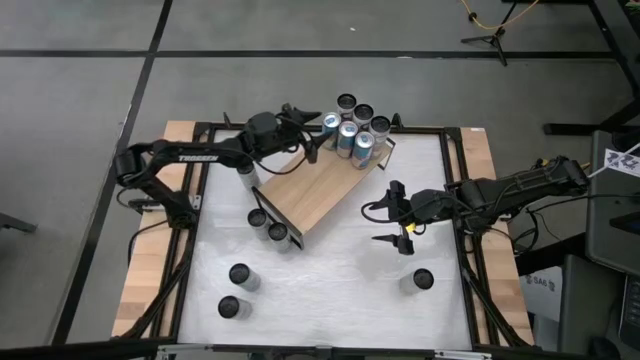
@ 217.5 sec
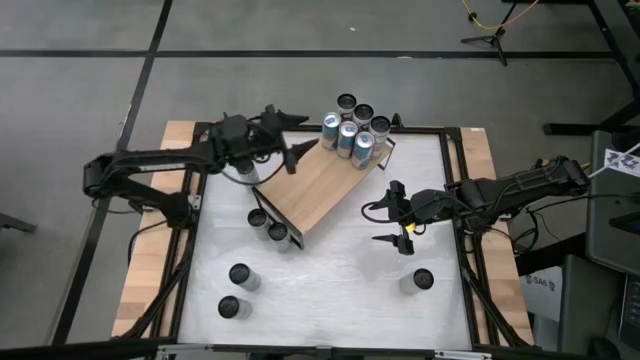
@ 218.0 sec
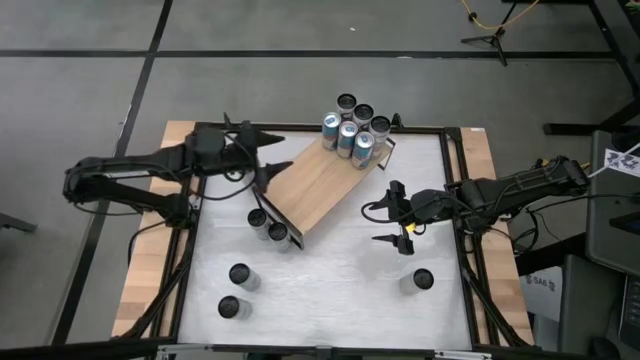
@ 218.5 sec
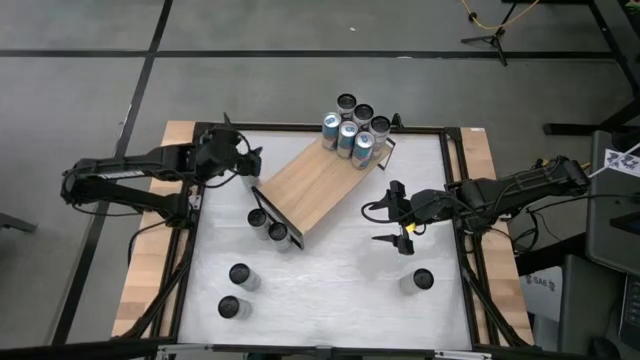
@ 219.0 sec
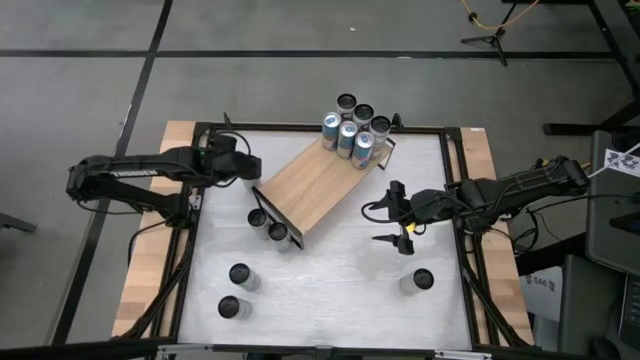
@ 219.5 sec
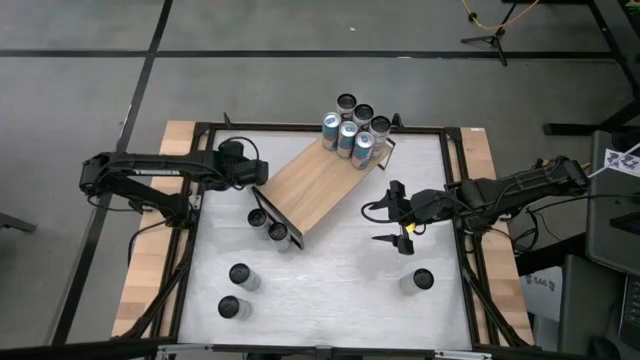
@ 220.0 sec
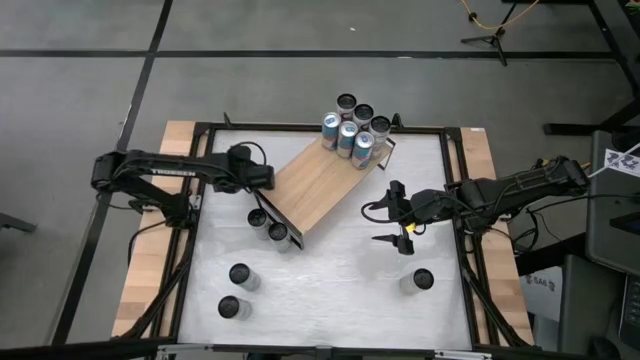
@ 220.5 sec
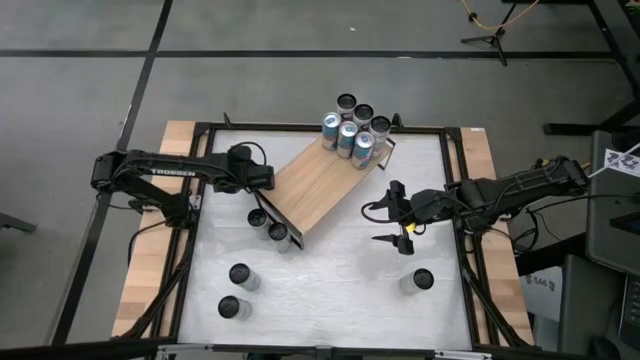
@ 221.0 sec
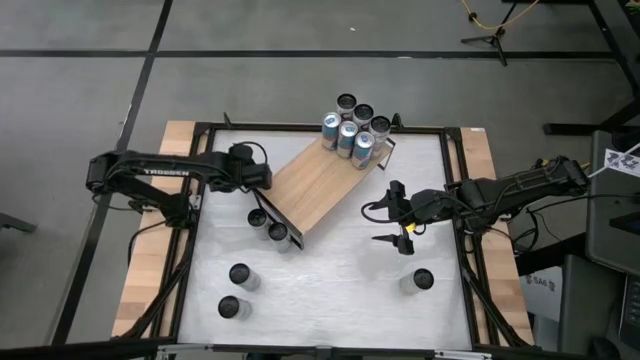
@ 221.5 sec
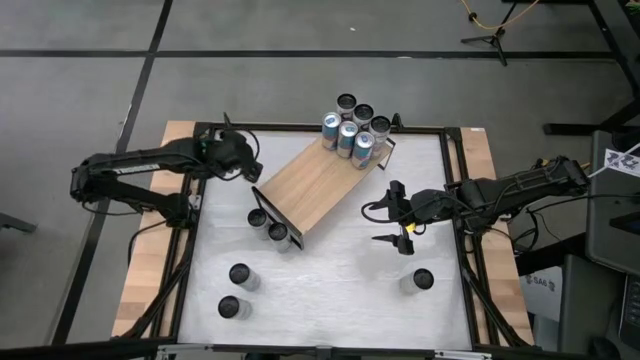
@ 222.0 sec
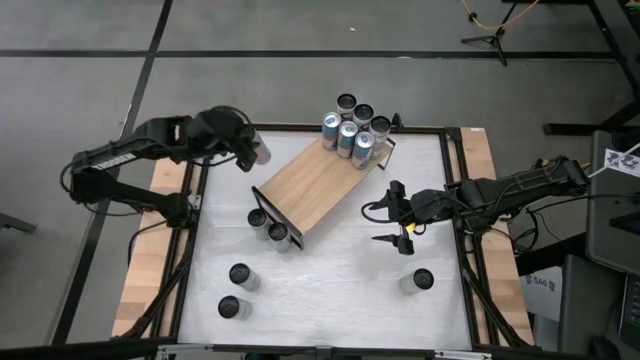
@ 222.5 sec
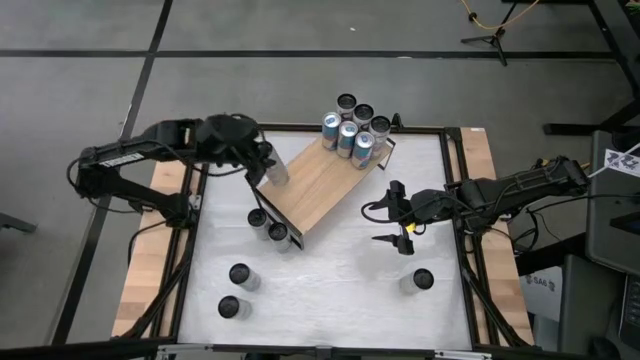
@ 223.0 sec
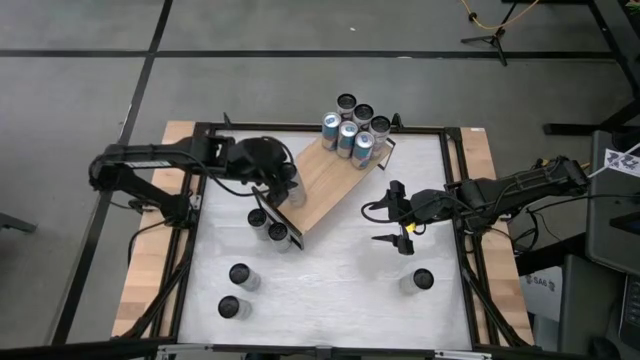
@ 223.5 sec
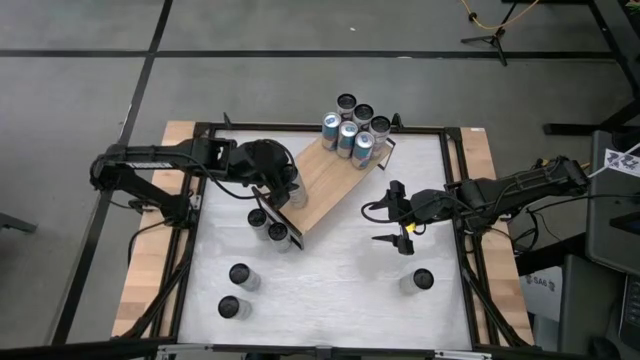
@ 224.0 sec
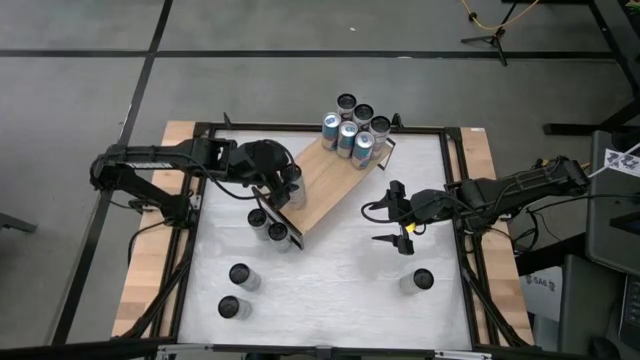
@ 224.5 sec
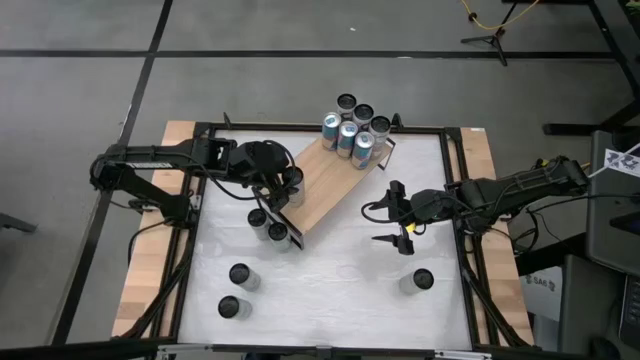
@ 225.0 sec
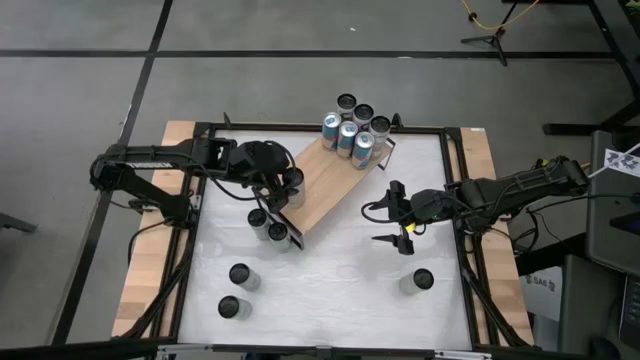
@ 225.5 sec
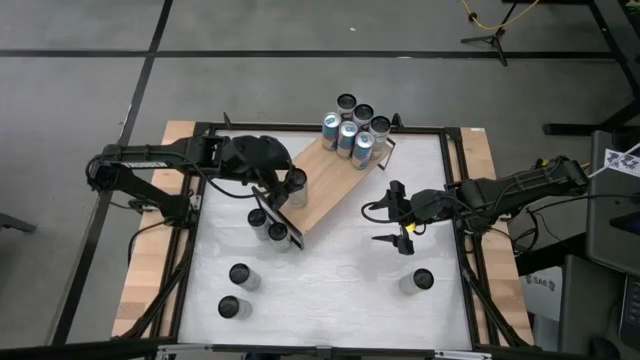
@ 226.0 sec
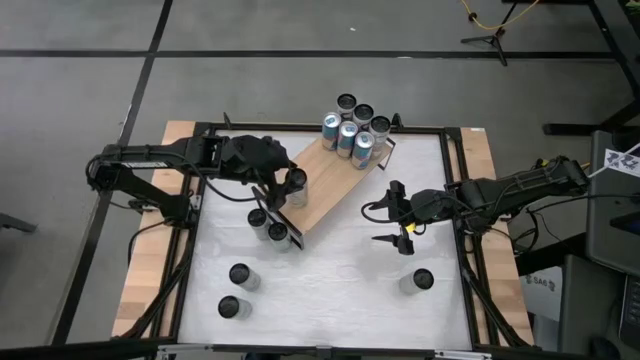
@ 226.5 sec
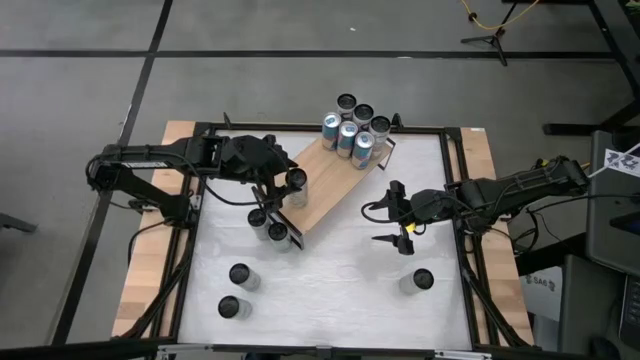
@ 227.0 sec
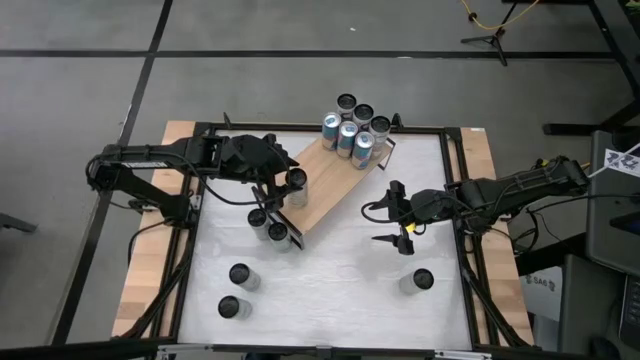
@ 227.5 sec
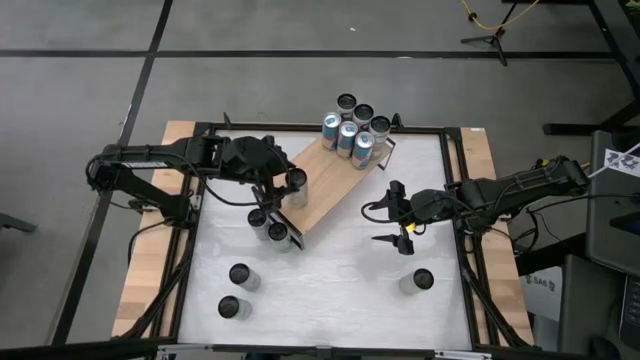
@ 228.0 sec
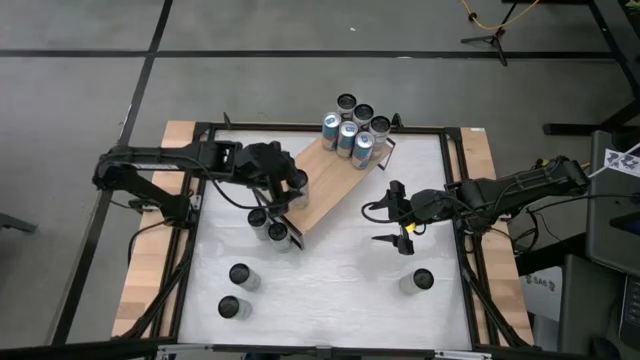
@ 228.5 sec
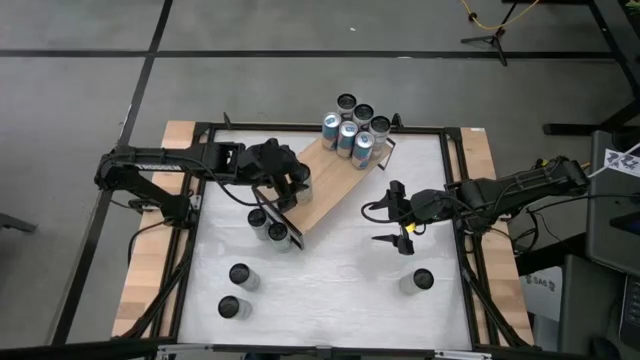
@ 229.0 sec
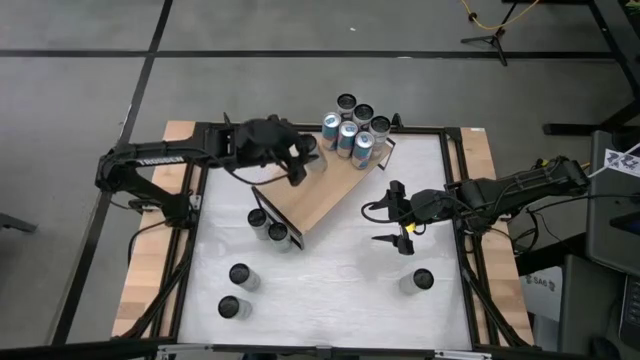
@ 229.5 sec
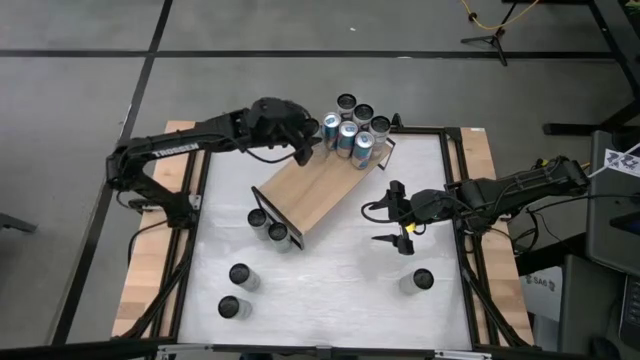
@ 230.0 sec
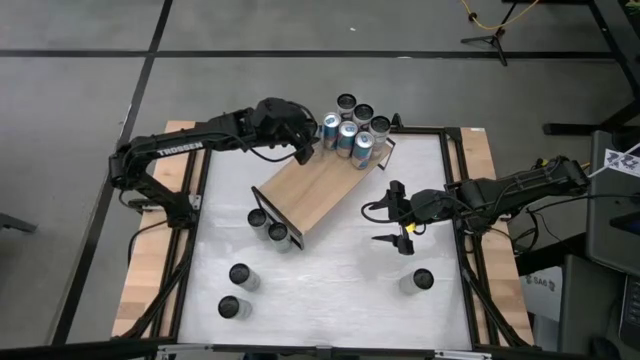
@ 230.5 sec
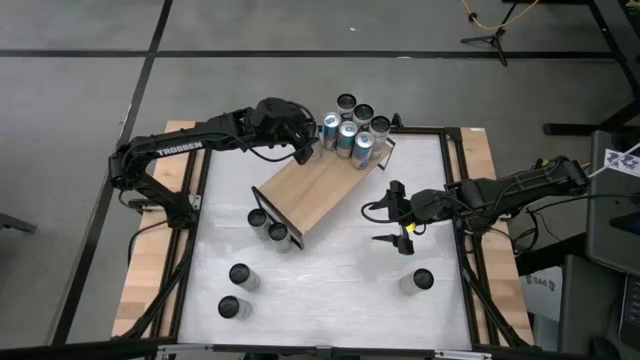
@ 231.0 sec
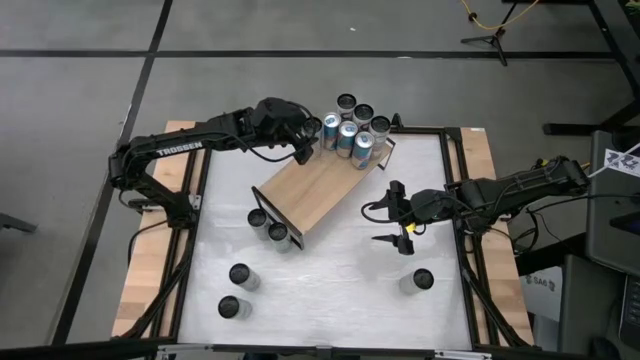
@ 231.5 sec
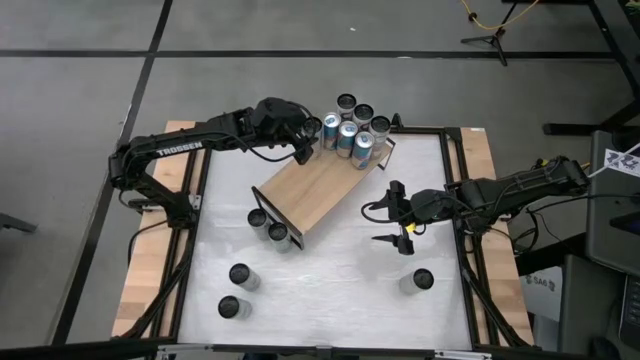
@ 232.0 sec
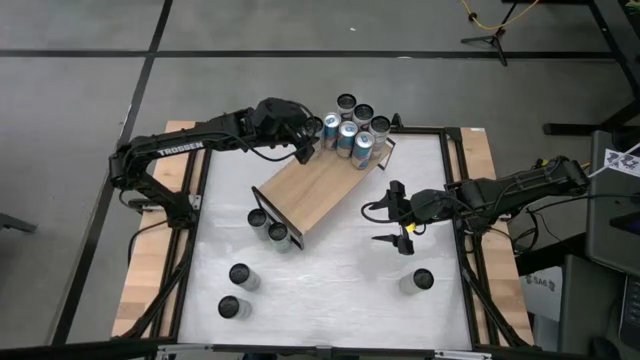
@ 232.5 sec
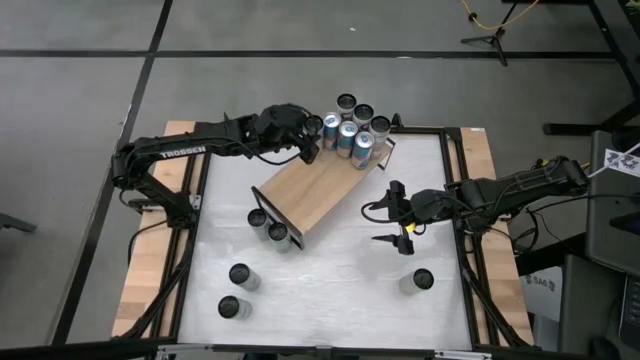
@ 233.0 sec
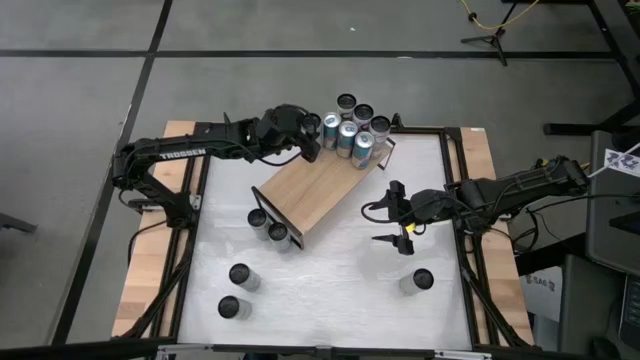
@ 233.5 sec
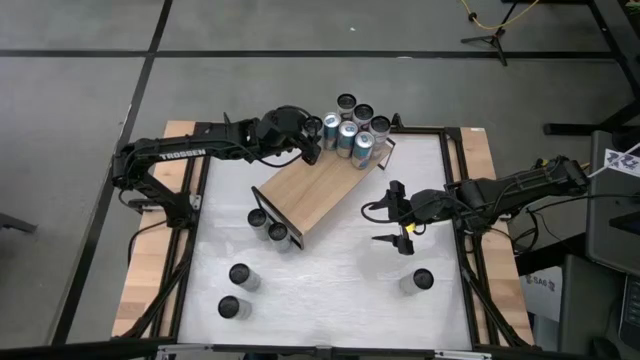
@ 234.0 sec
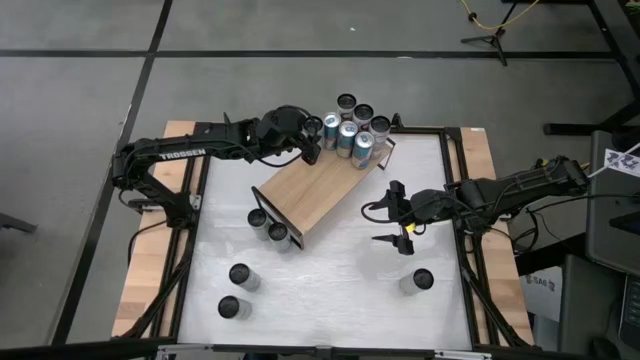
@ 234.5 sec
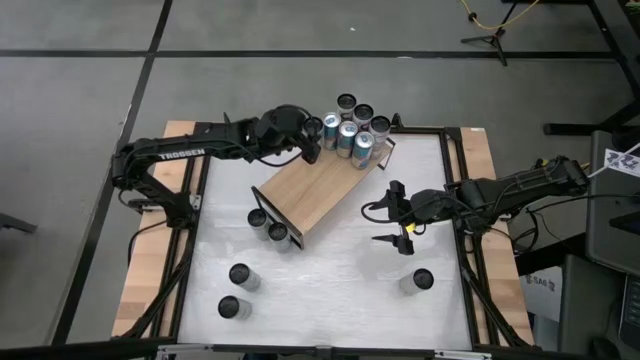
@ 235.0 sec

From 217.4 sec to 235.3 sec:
Task: Place canned beverage on shelf
Put the white-yellow soda can on the shelf

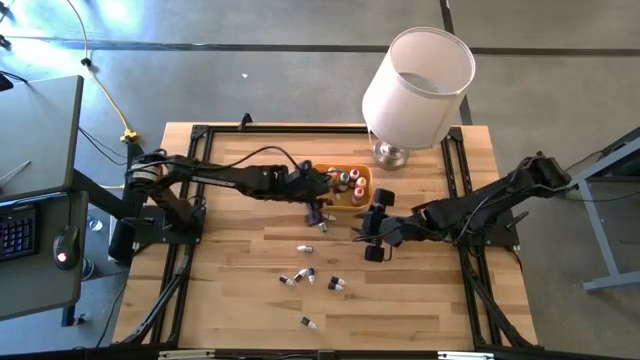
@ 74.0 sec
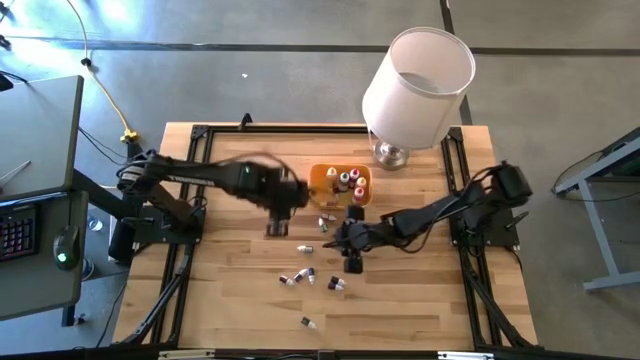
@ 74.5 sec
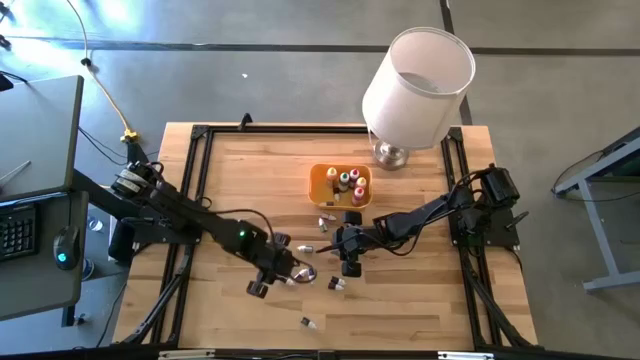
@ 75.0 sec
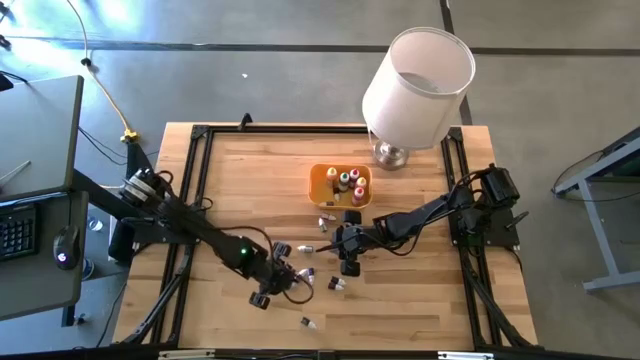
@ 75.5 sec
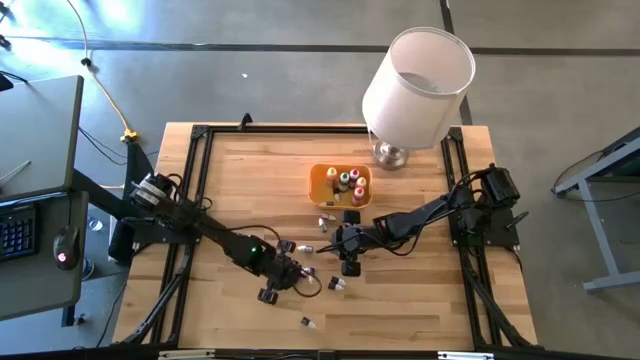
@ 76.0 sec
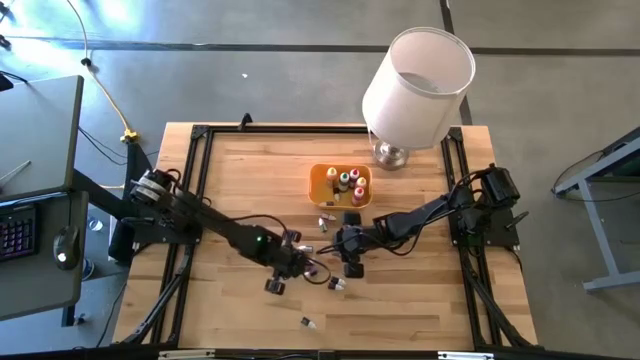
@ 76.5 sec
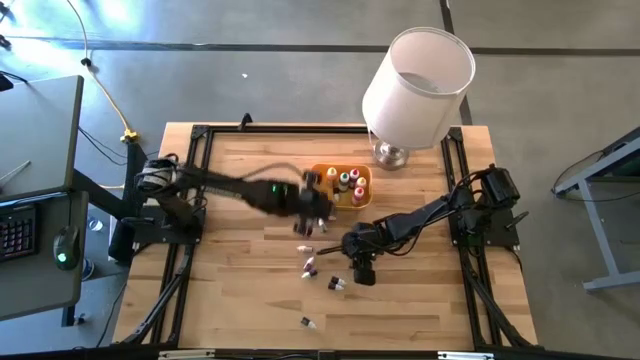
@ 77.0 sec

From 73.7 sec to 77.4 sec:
Task: Pick & Place food coloring
Put the small red food coloring bottle into the yellow container
